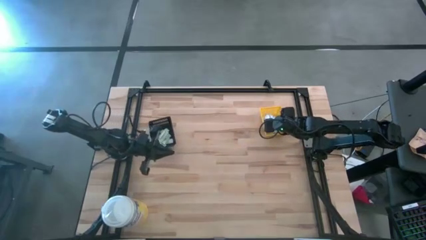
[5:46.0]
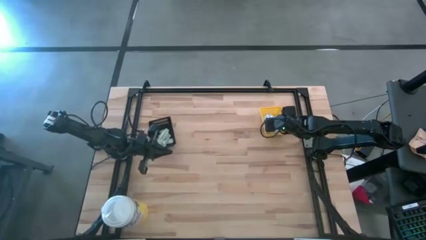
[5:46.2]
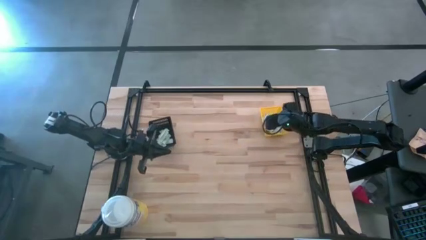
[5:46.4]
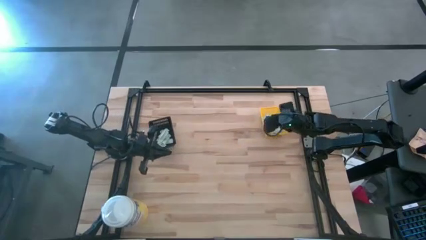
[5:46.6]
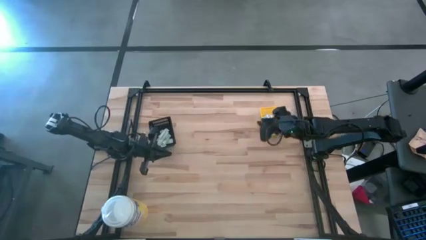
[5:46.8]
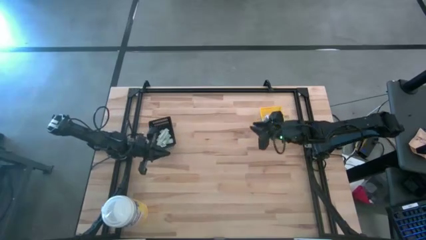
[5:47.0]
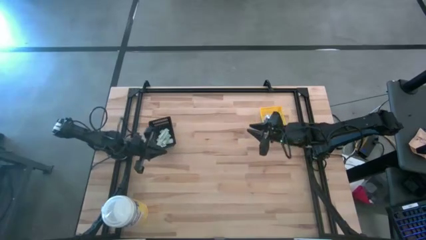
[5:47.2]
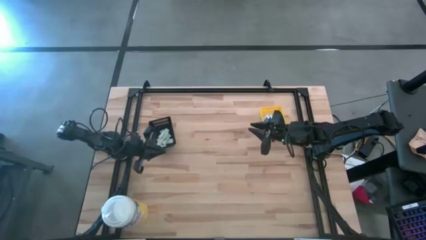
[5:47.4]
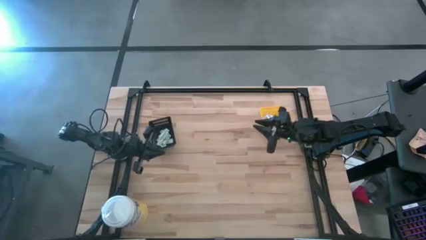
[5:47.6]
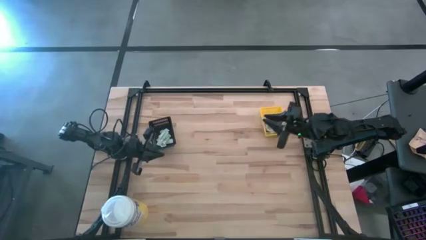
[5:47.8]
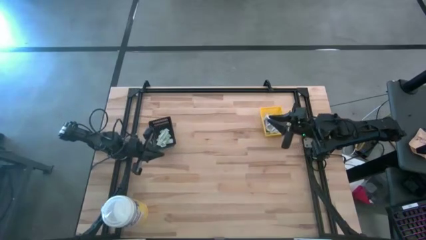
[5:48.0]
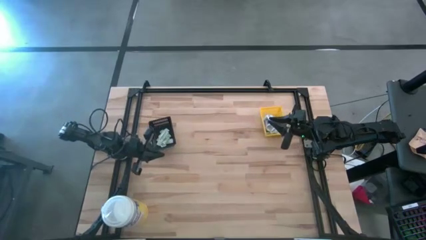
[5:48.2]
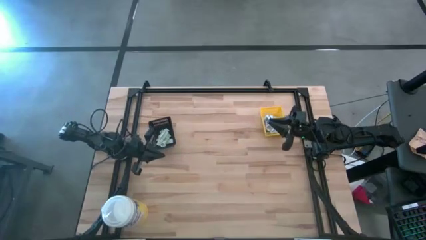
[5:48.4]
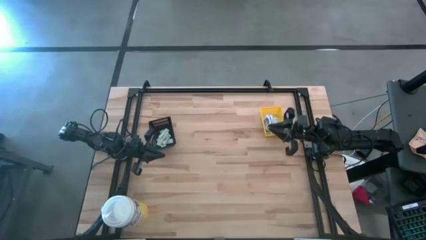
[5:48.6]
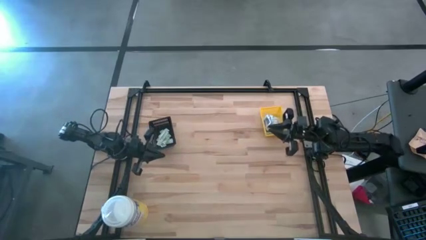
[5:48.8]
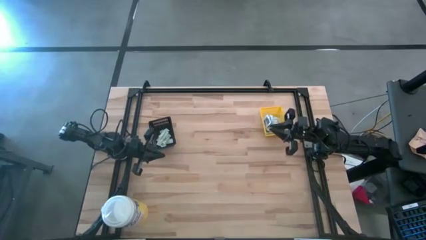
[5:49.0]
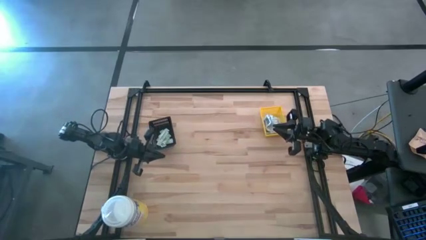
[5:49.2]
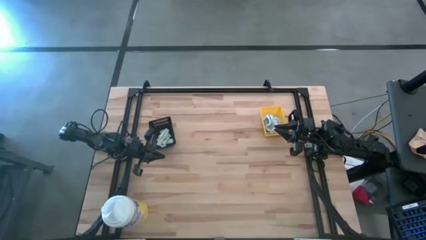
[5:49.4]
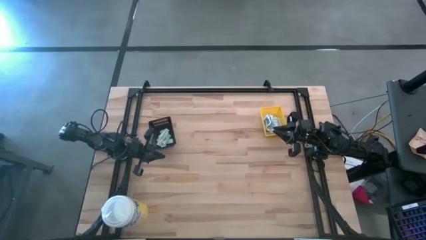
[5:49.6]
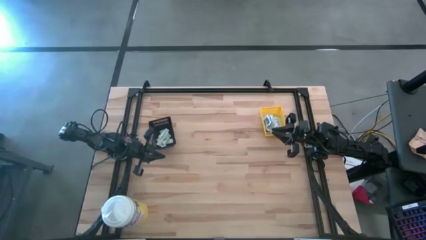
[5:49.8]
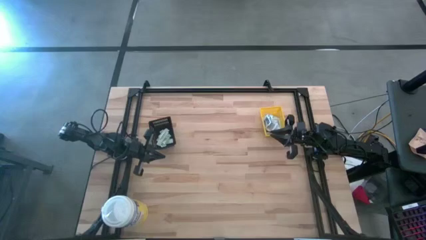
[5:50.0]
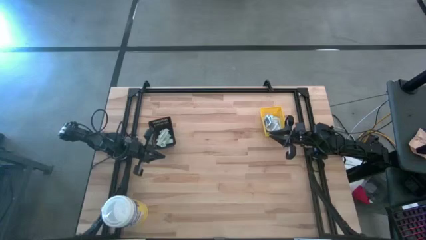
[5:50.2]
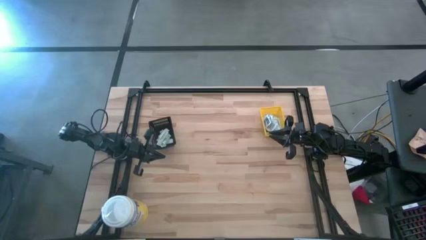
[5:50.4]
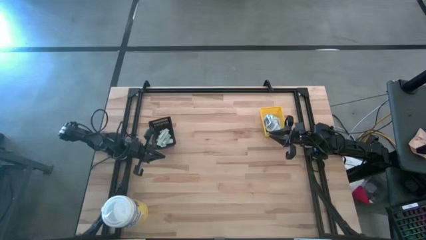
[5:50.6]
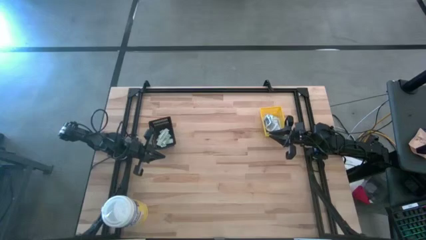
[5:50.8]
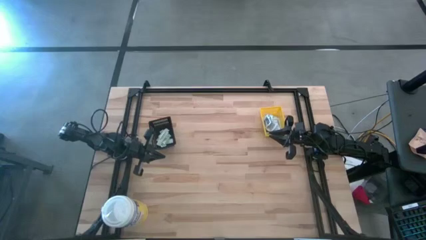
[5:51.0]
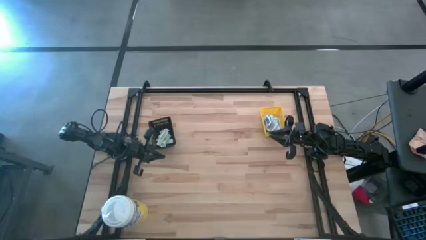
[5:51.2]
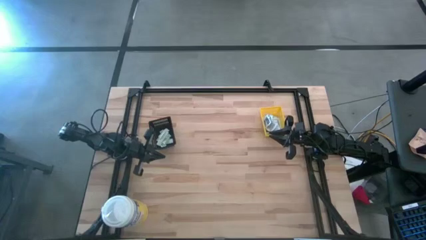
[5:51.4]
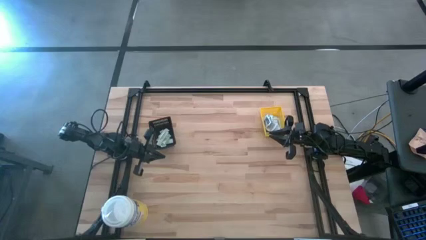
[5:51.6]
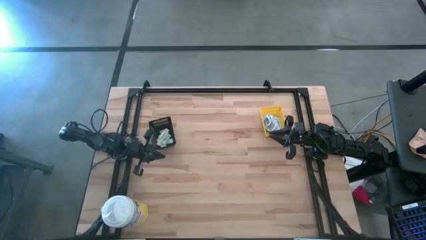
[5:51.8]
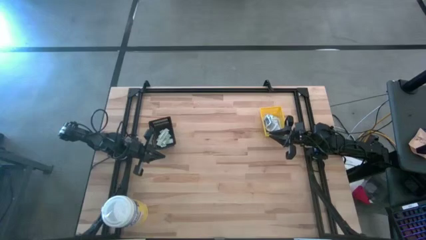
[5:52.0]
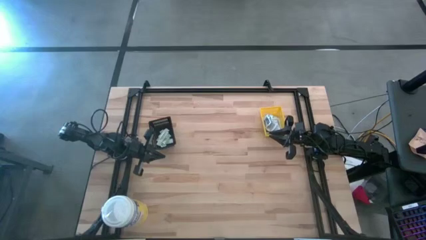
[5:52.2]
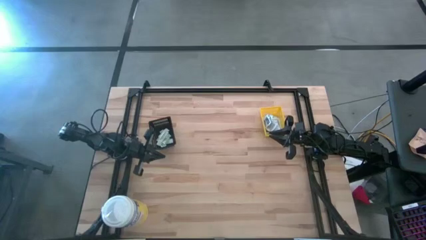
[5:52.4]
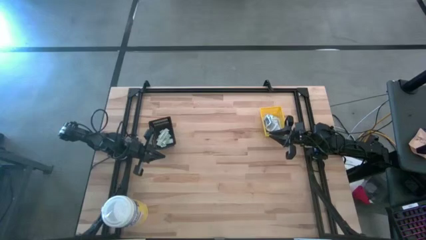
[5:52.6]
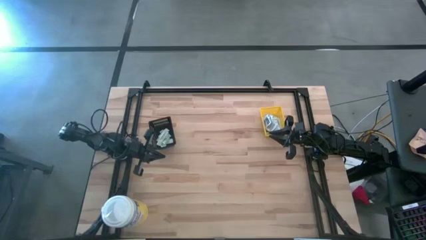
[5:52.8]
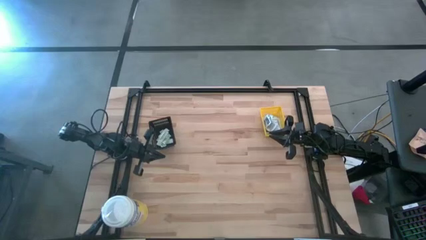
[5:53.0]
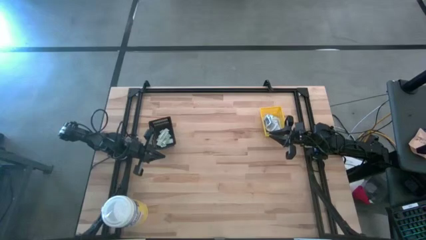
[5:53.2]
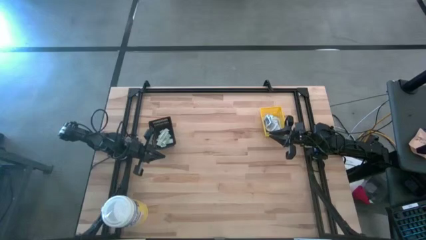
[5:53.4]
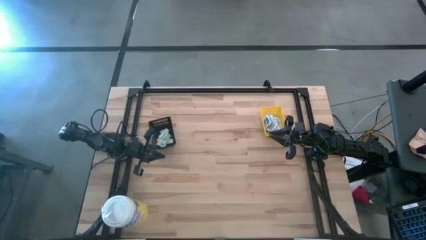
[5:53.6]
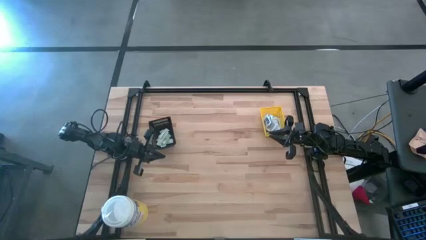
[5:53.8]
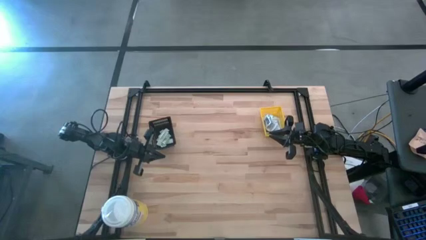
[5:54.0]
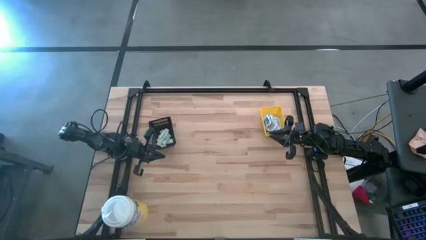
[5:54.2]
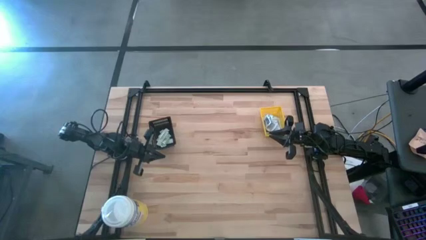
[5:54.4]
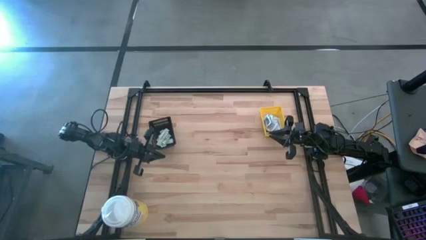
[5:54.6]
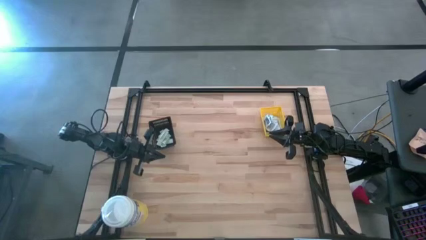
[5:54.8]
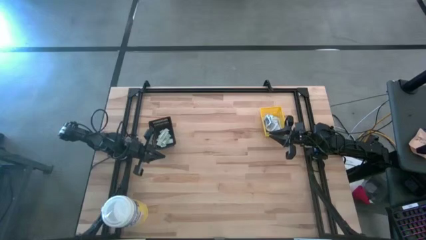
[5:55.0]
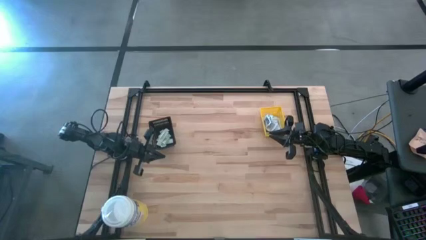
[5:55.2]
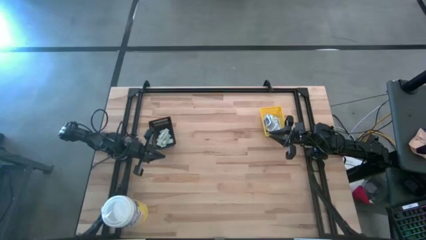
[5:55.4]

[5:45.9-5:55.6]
Task: Pick & Place First Aid Supplies
Return to Home Position
